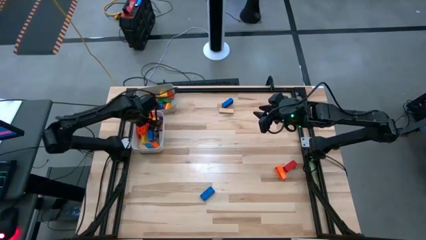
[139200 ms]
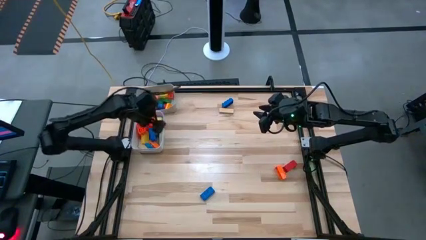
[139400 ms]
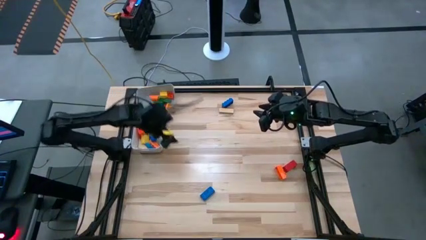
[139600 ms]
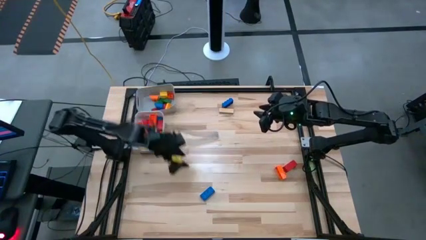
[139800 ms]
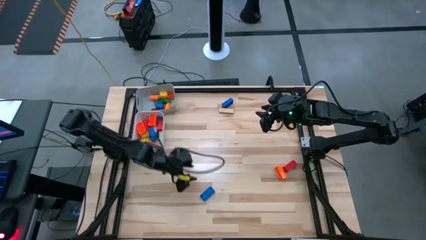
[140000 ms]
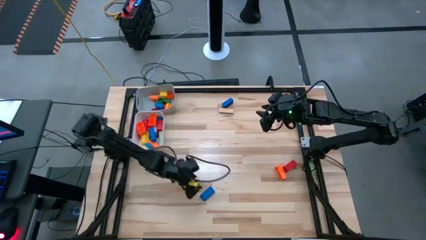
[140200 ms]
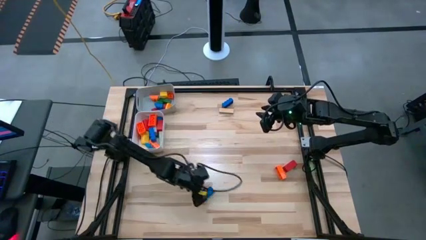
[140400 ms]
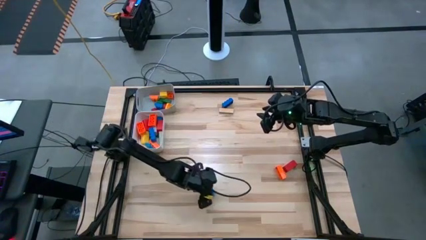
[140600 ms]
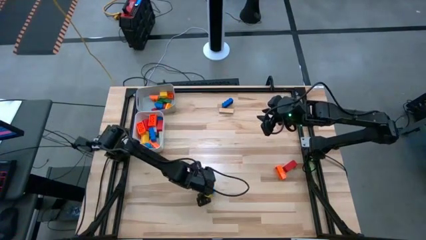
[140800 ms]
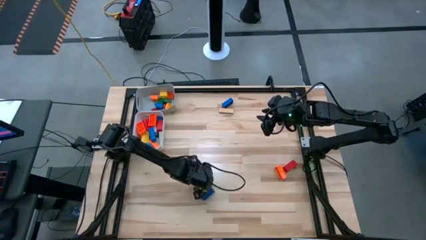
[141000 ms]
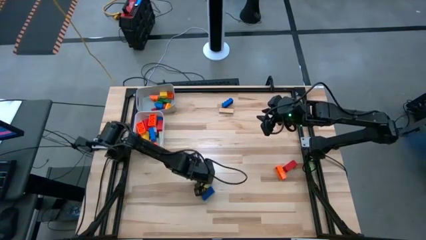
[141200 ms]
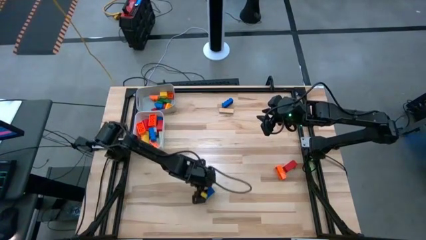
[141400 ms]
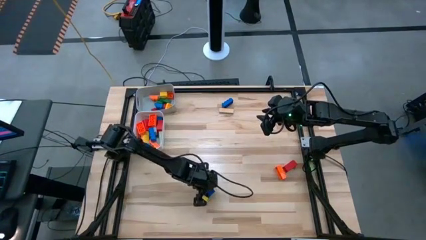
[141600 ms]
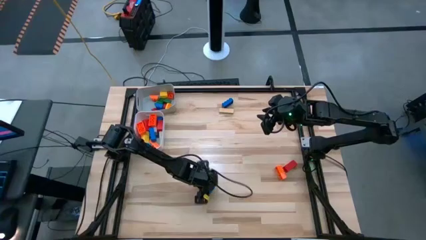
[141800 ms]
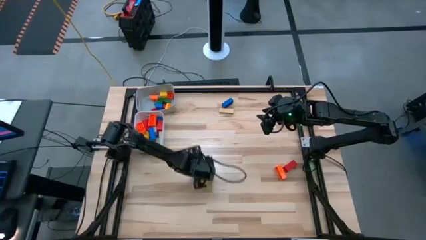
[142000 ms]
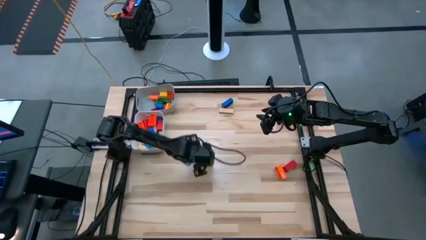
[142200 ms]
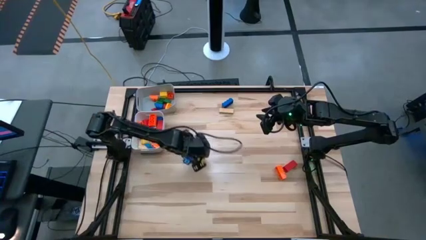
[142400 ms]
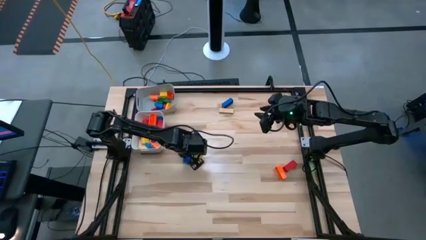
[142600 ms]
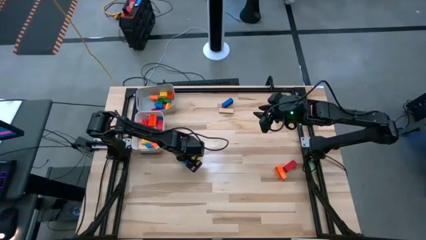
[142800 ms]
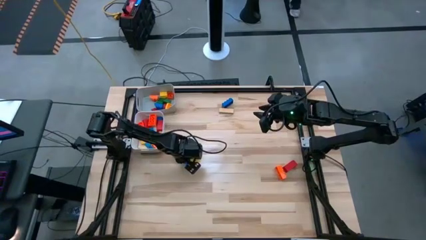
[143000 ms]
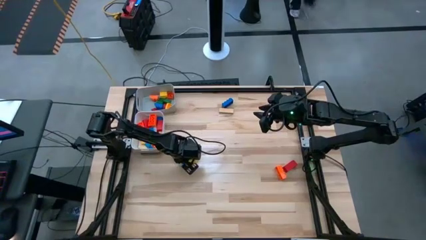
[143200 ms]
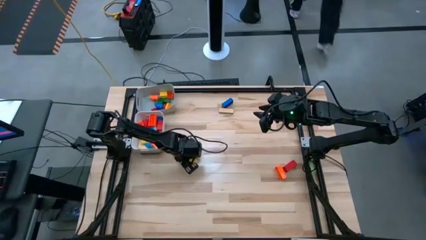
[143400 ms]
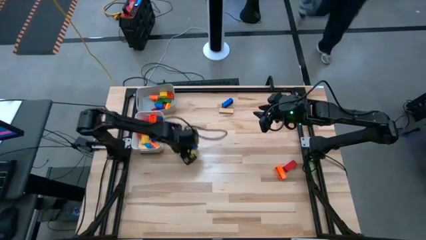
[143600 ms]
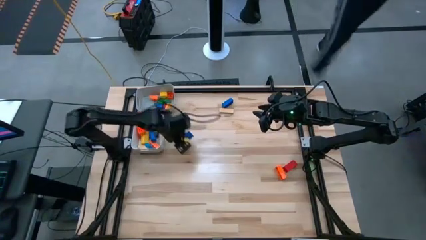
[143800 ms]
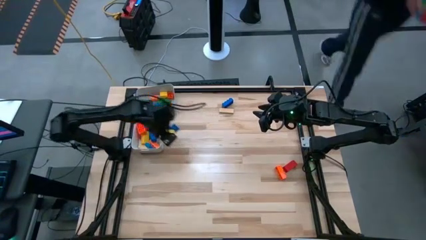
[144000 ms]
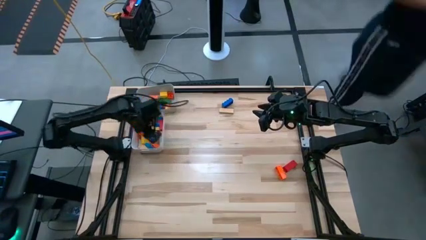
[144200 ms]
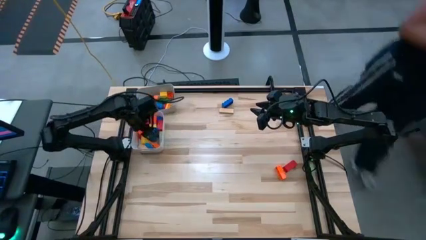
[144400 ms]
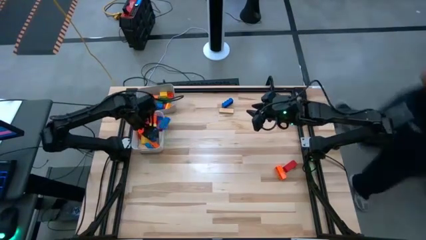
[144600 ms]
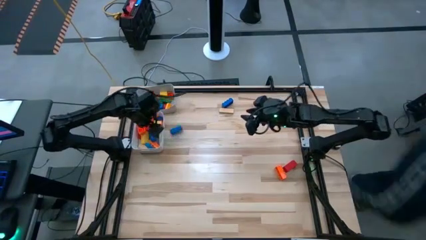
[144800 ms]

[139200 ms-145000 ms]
Task: Sort blocks by size
Put the large blue game piece into the white bin

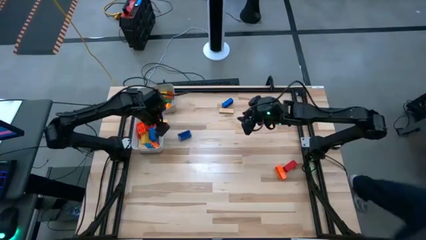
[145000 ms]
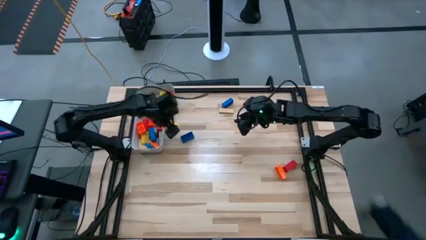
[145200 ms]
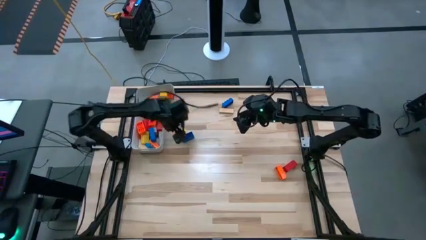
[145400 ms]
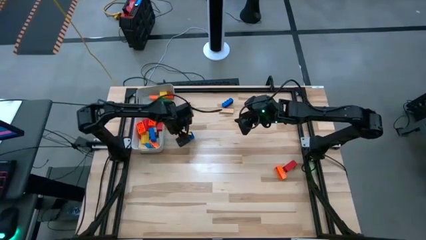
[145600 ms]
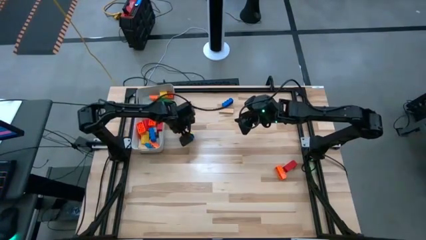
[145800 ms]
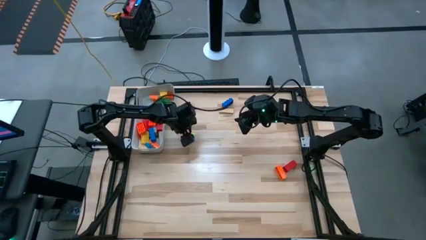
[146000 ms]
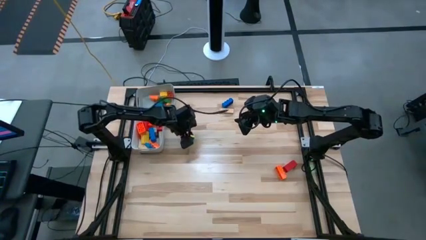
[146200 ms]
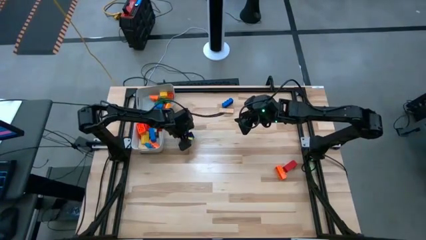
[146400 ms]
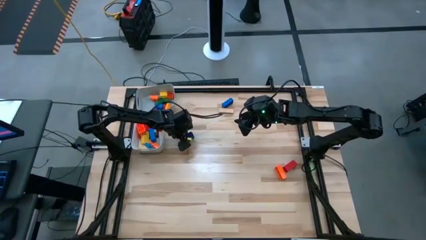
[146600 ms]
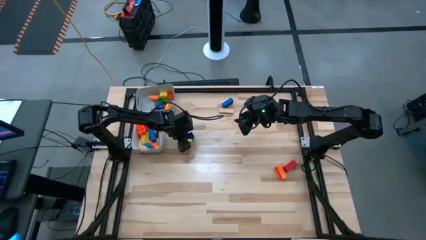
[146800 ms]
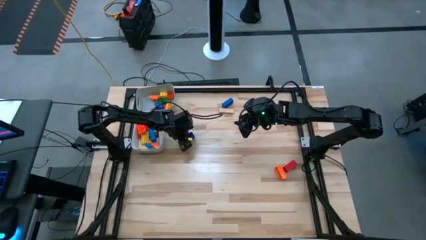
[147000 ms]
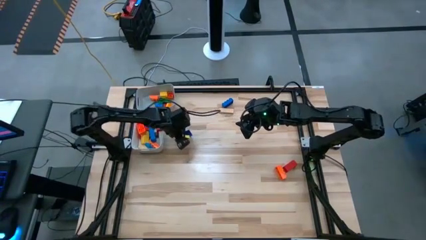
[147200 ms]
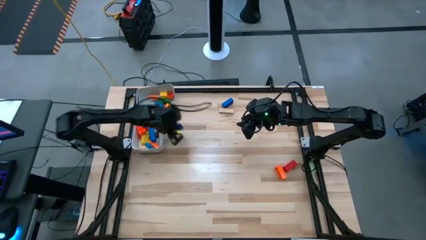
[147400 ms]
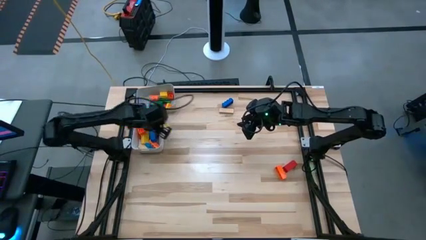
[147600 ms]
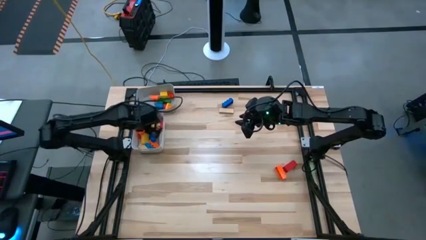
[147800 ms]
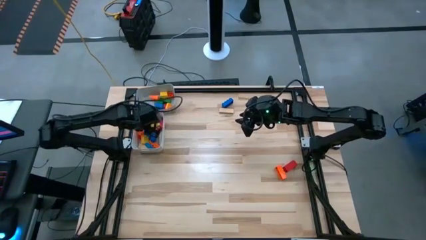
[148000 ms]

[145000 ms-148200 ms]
Put the large blue game piece into the white bin

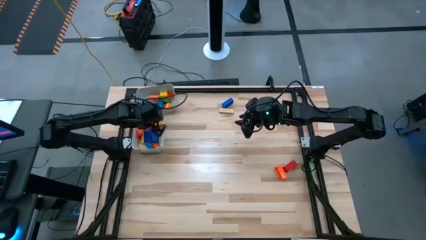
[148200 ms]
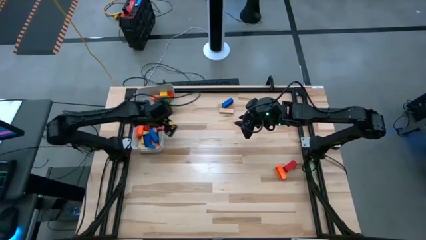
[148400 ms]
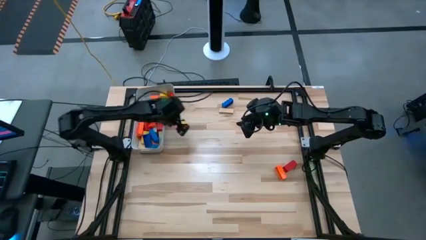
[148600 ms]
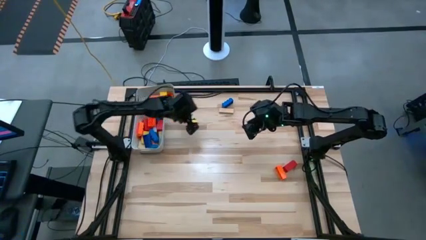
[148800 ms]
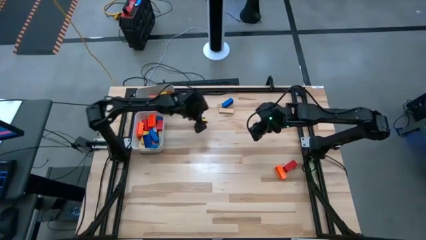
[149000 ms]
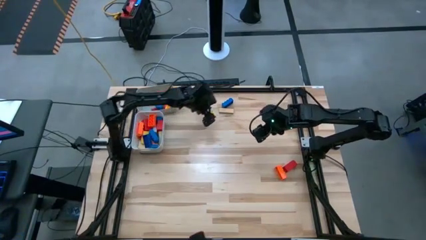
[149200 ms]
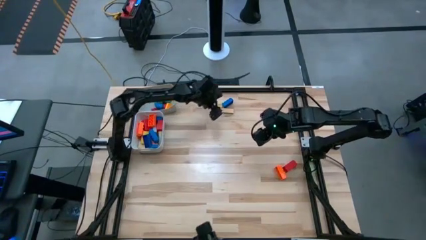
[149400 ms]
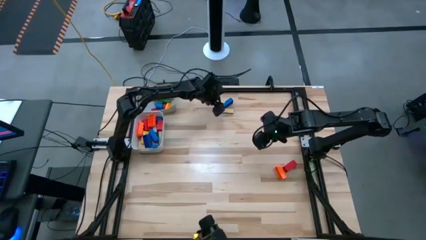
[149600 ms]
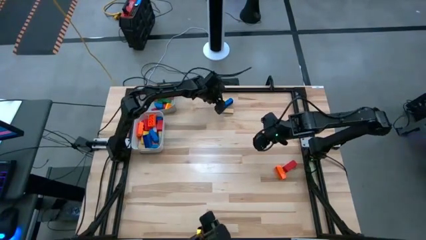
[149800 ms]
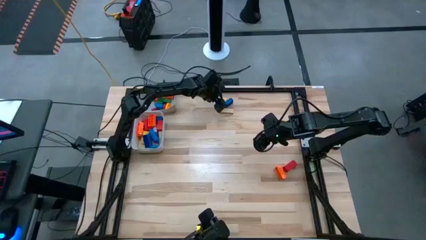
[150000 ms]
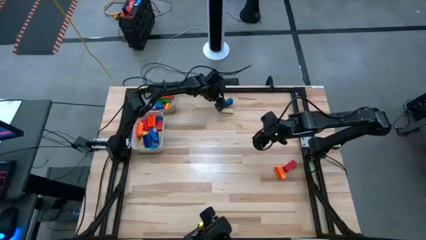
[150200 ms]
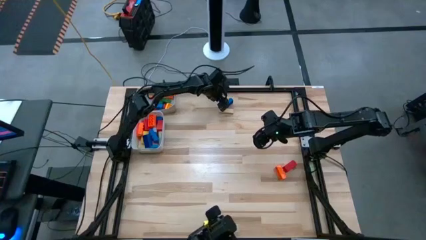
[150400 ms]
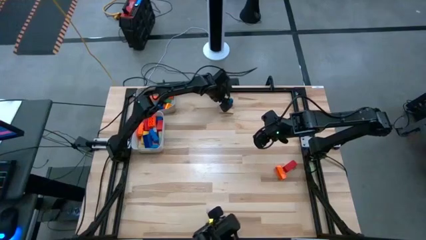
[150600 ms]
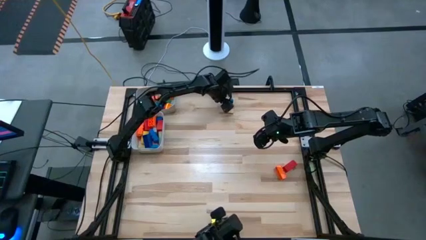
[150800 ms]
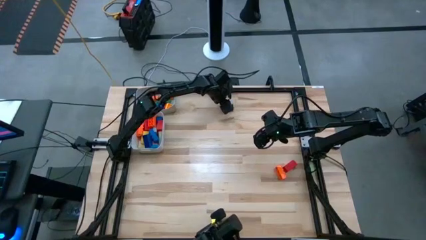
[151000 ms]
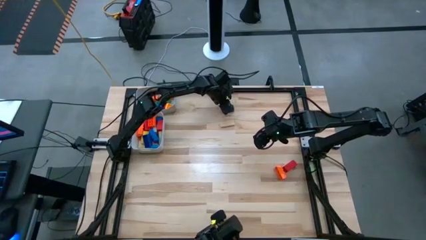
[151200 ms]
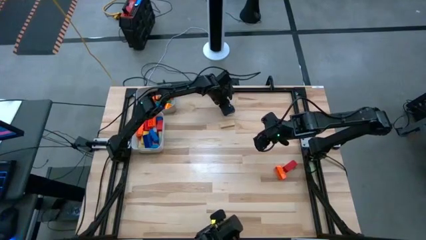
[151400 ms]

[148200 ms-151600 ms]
Put the large blue game piece into the white bin

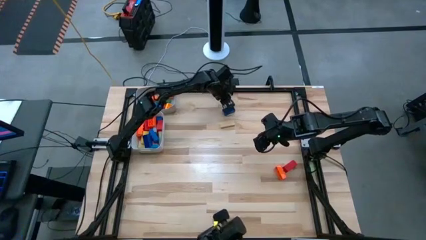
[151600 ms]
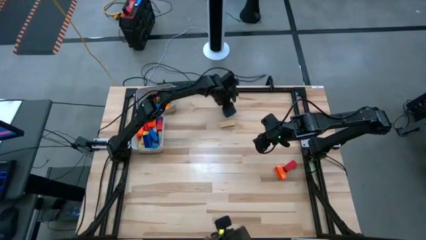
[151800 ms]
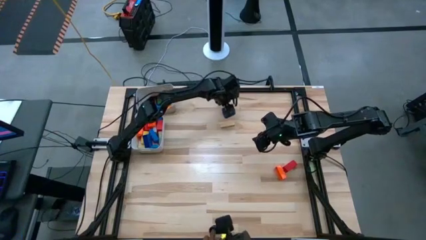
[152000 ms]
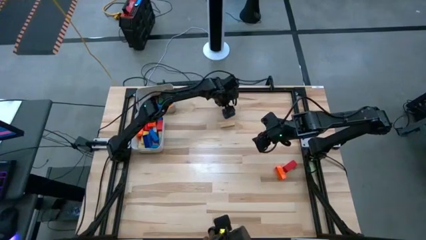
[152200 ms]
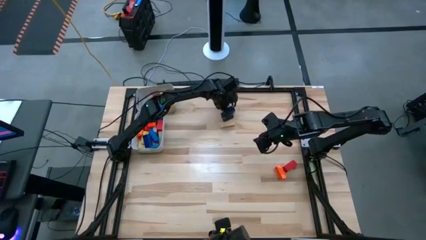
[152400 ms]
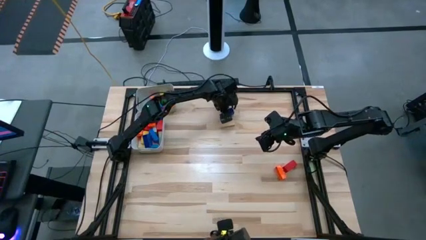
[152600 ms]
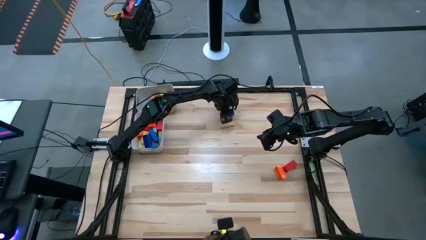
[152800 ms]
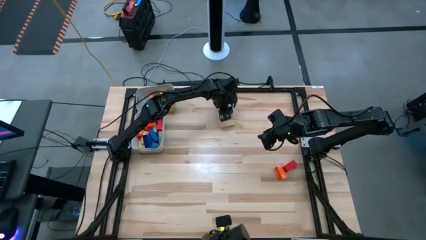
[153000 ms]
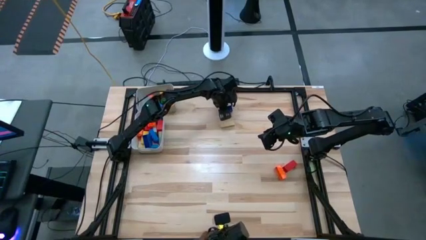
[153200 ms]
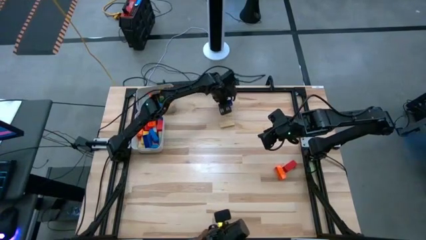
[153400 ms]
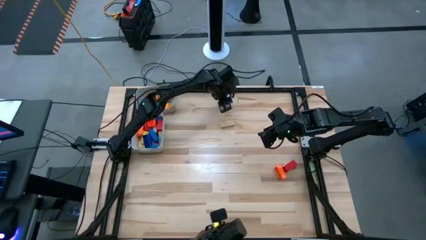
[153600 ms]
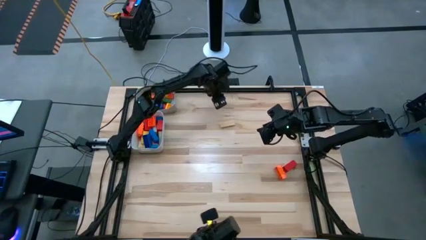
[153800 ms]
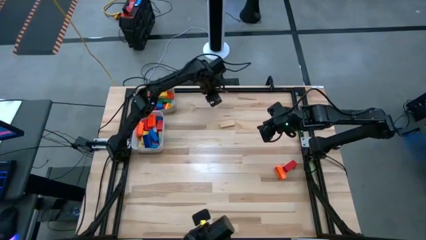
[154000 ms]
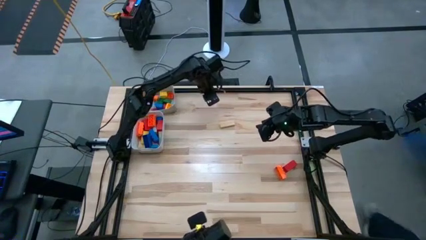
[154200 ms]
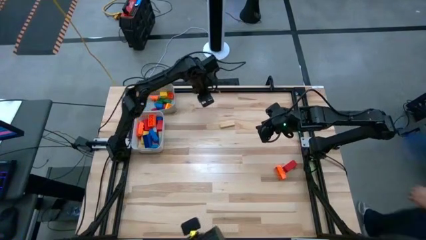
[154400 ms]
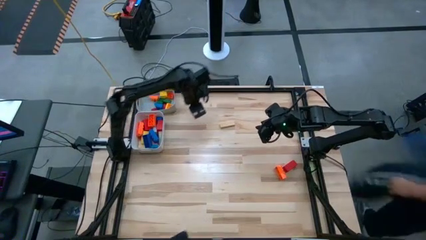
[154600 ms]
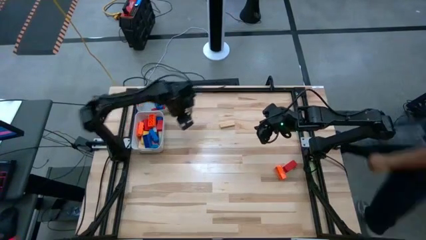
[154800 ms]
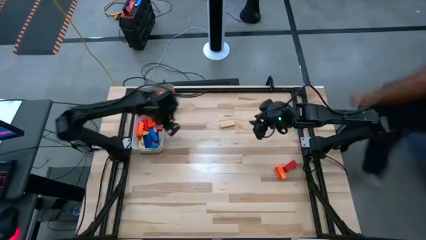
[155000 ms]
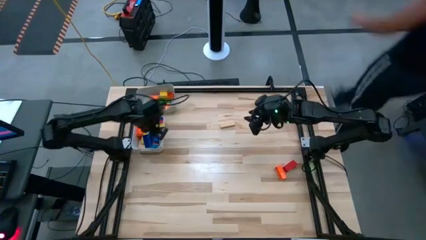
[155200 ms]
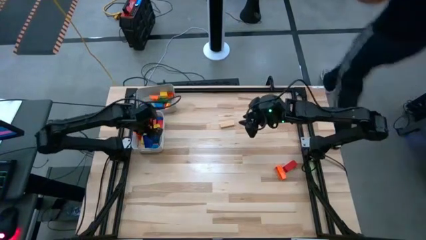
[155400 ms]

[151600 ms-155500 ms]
Put the large blue game piece into the white bin
